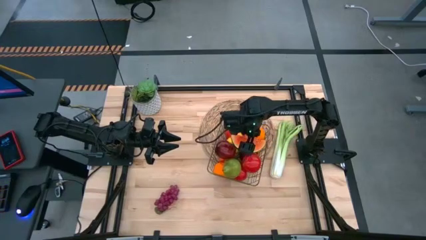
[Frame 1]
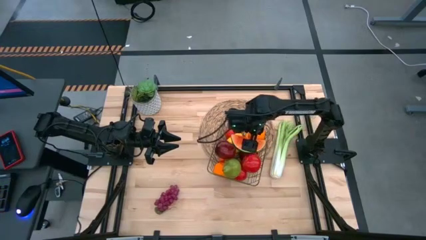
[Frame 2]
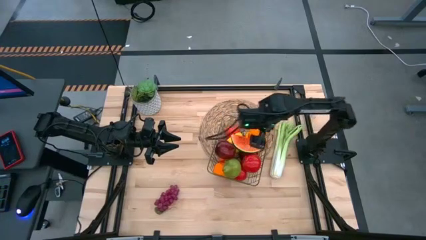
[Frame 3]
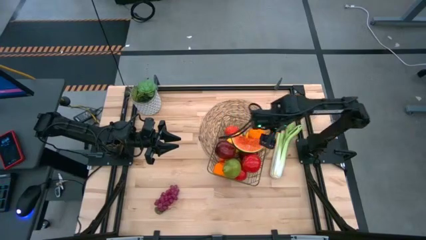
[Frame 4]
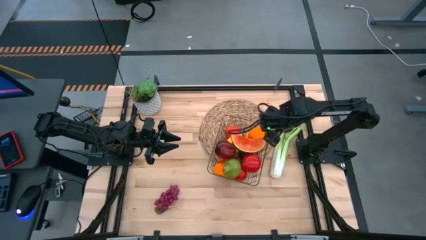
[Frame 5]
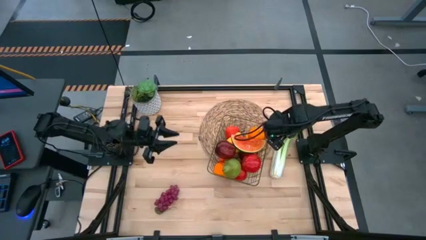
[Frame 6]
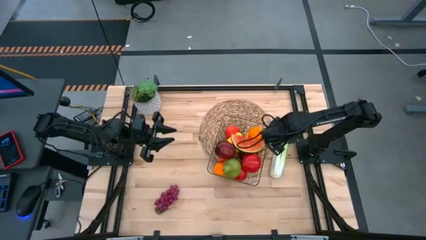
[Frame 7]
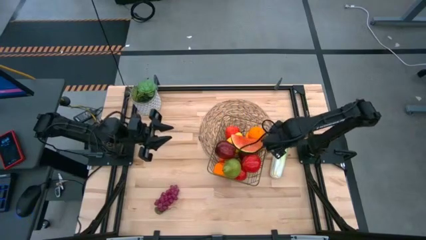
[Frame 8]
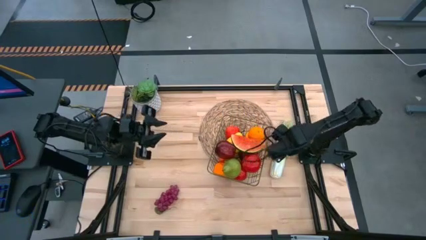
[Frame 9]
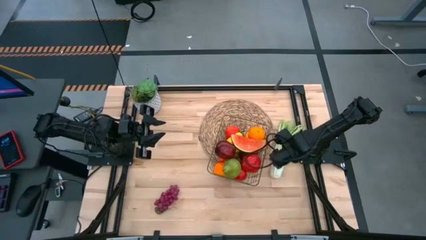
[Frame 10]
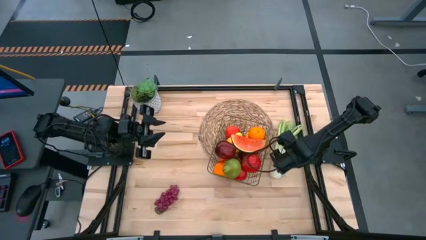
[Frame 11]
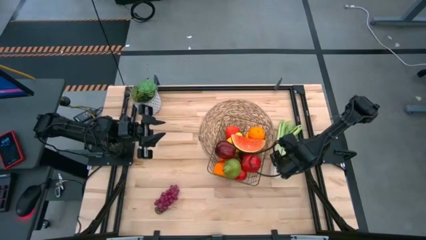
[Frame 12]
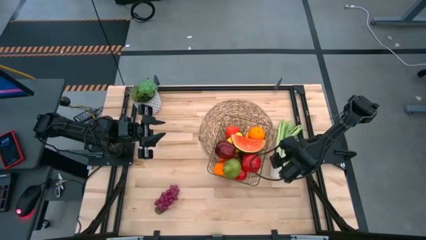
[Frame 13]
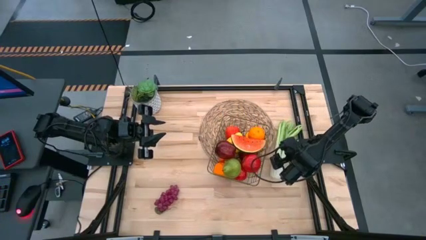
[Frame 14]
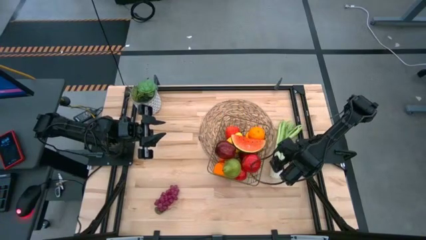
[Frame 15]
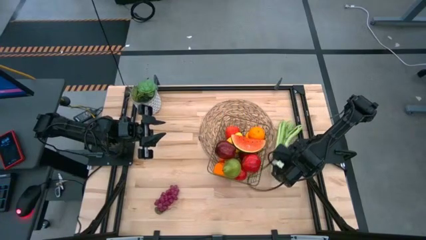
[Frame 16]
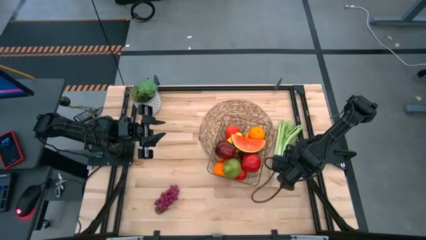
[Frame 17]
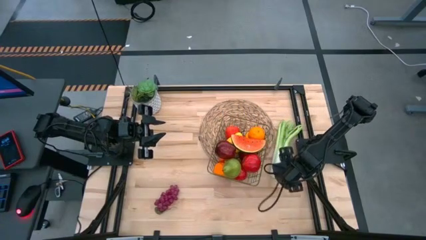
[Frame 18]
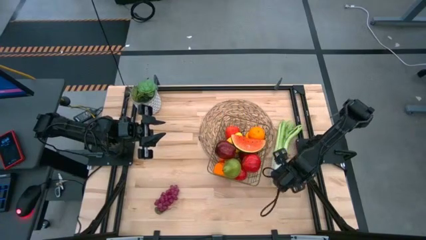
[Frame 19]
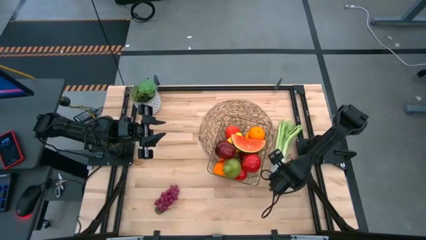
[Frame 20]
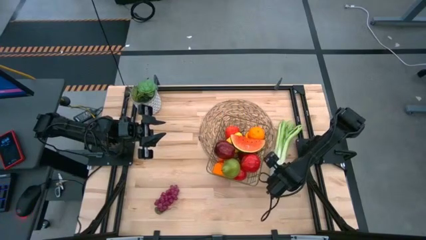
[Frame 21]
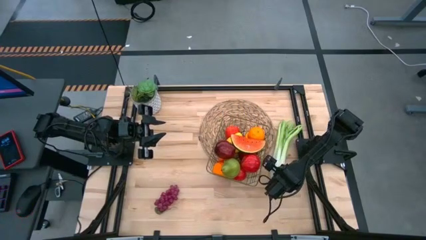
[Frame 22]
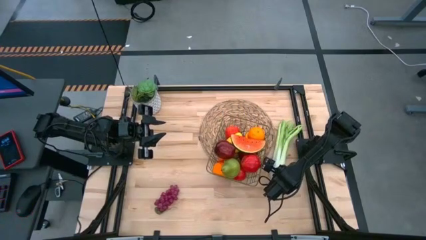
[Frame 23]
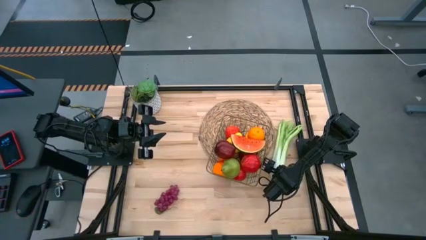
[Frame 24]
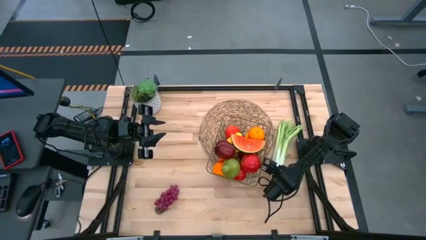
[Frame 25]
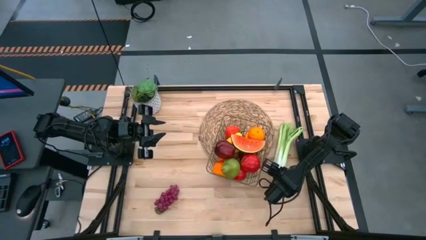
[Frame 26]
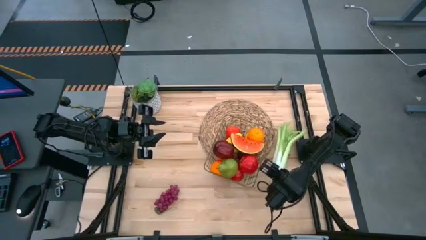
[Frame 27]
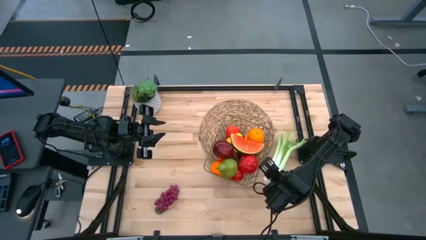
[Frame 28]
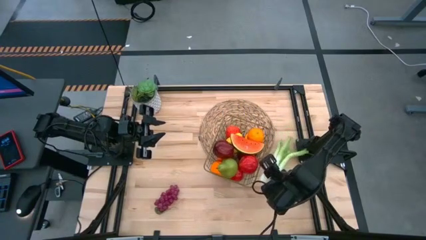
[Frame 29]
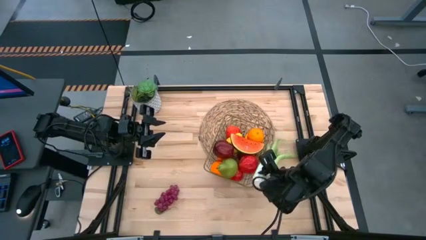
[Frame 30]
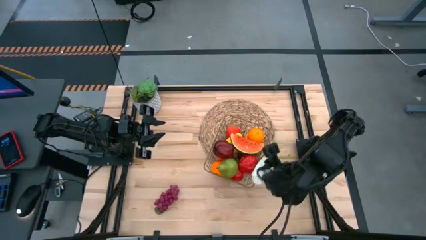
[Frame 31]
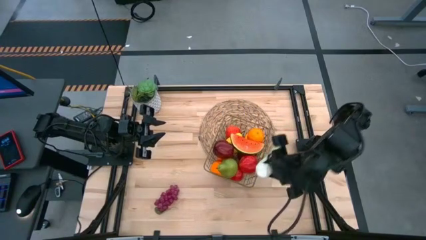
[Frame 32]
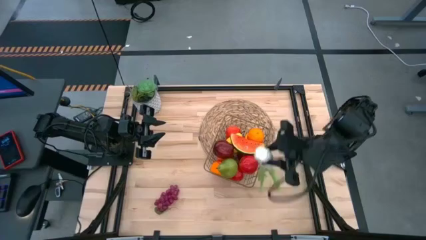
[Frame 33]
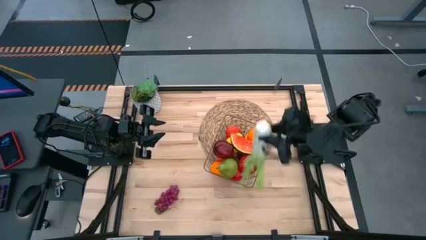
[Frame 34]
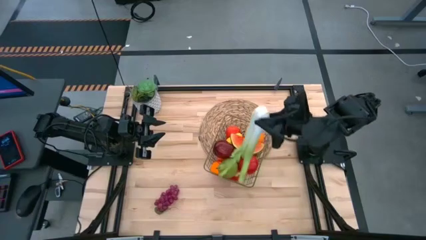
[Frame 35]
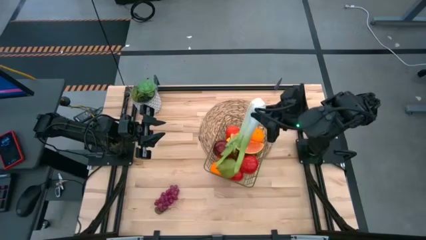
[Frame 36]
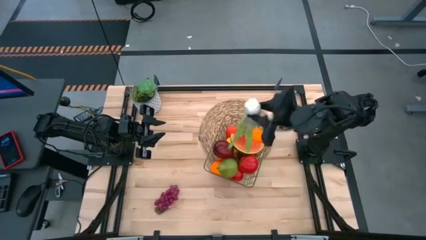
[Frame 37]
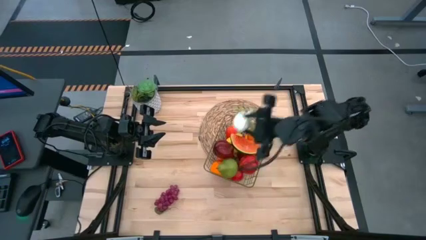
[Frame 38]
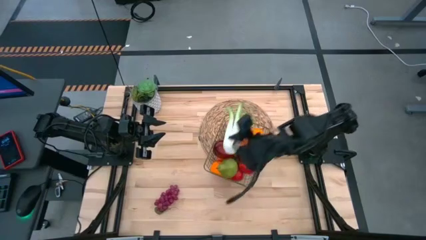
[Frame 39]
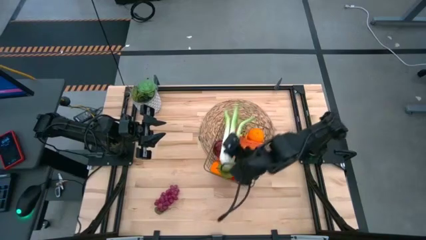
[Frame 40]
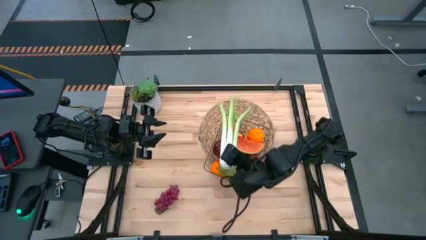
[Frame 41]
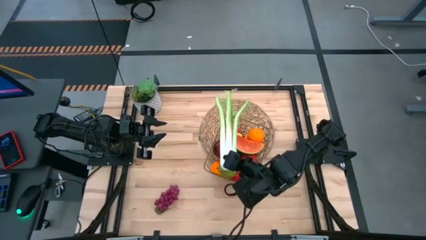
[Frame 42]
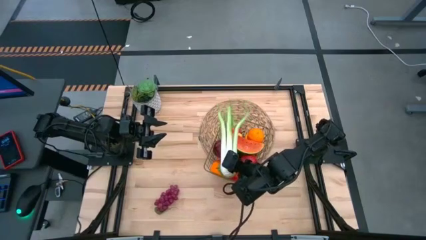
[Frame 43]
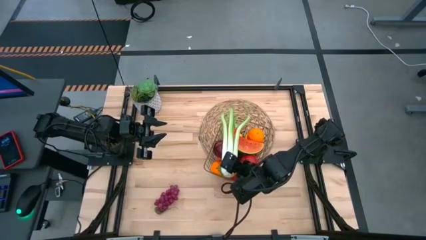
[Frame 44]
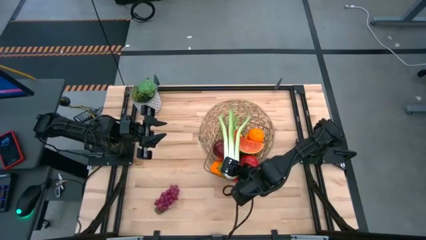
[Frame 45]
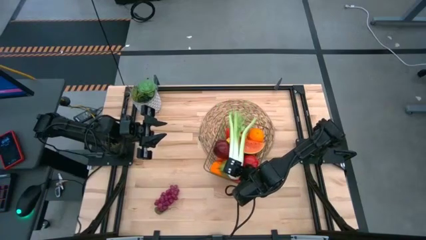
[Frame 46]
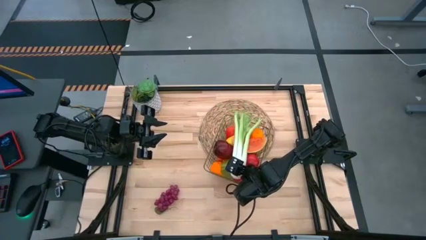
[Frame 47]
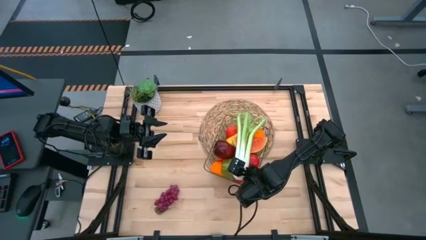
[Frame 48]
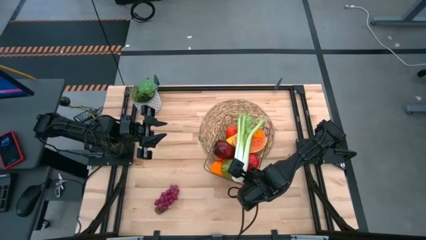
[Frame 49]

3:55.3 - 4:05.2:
Task: Build produce basket
Put the celery into the wire basket

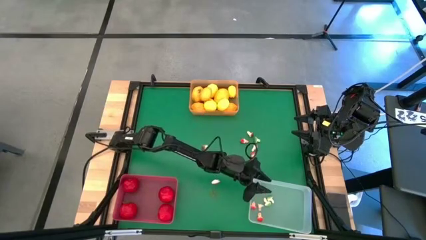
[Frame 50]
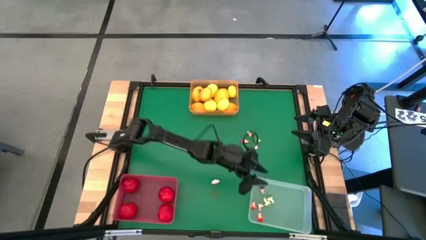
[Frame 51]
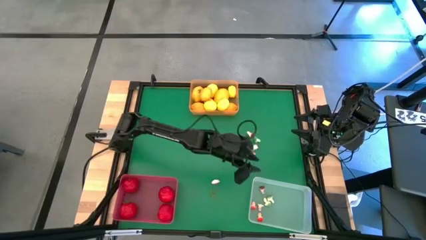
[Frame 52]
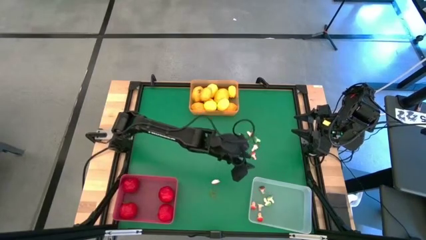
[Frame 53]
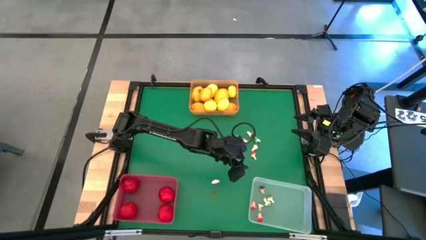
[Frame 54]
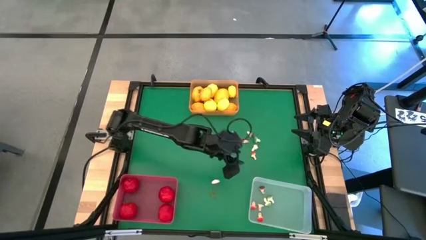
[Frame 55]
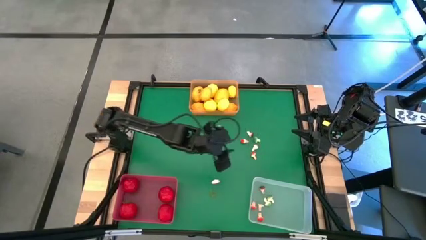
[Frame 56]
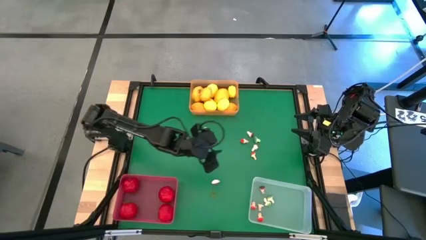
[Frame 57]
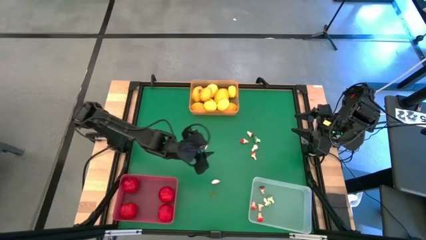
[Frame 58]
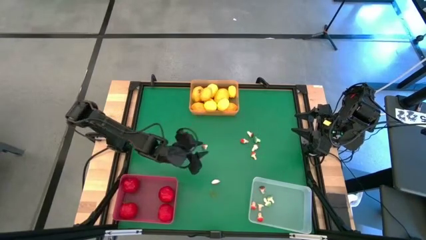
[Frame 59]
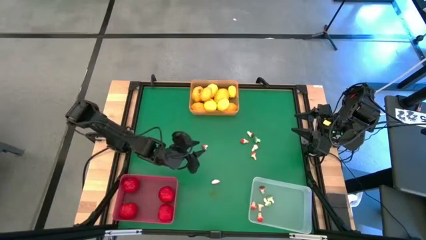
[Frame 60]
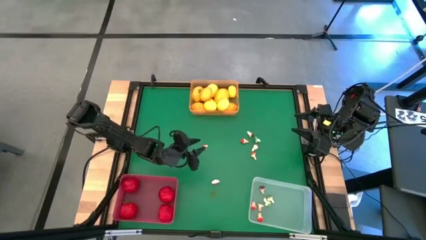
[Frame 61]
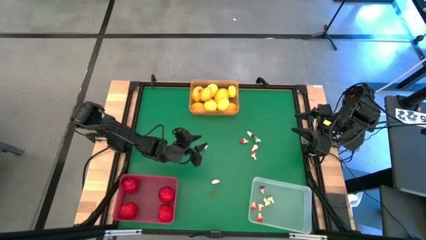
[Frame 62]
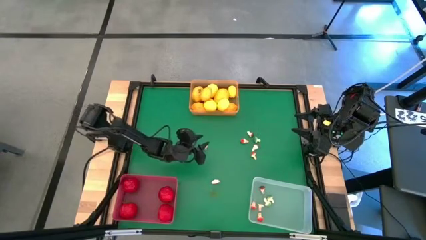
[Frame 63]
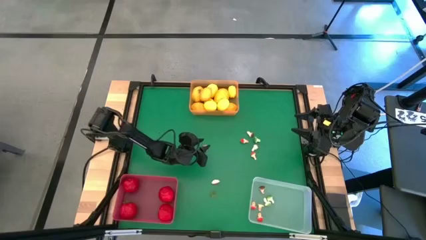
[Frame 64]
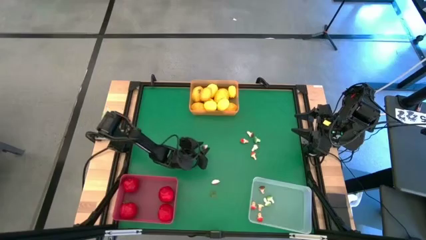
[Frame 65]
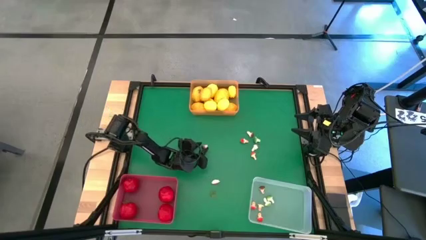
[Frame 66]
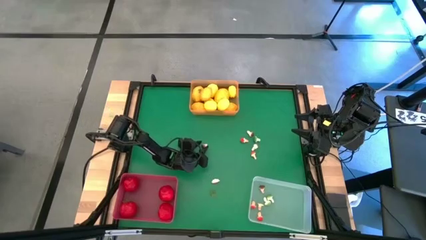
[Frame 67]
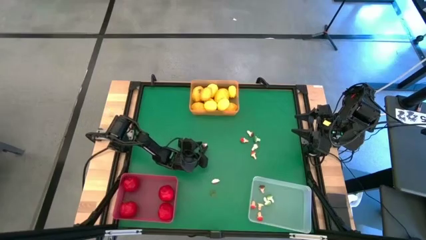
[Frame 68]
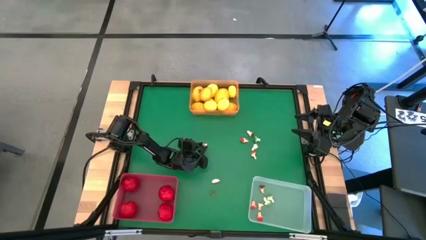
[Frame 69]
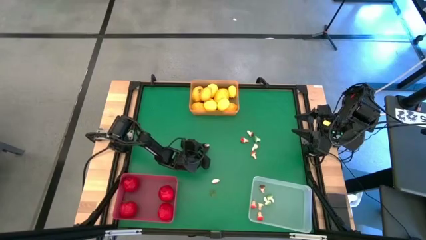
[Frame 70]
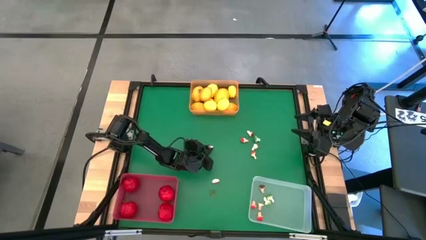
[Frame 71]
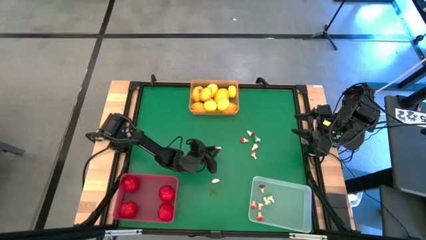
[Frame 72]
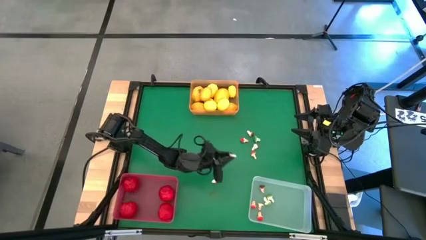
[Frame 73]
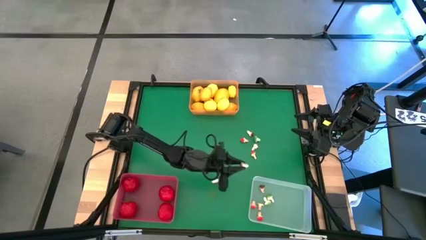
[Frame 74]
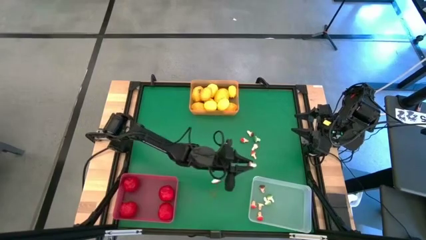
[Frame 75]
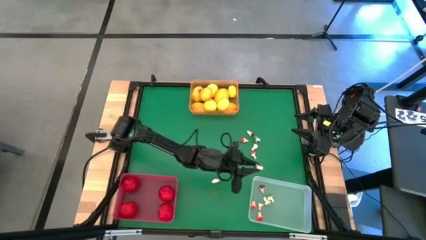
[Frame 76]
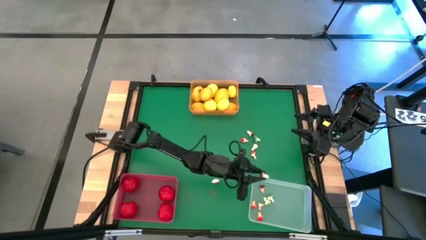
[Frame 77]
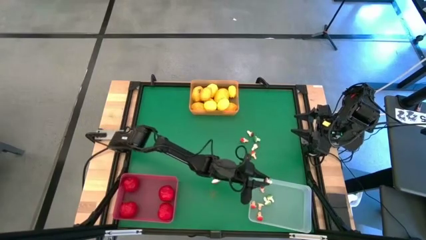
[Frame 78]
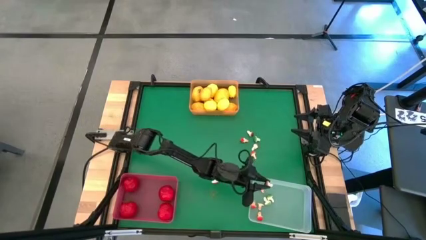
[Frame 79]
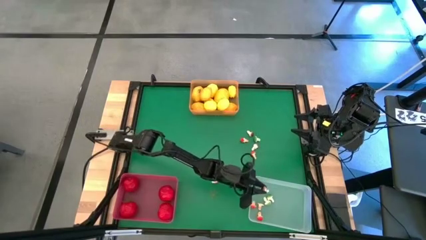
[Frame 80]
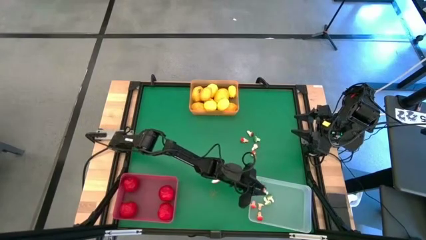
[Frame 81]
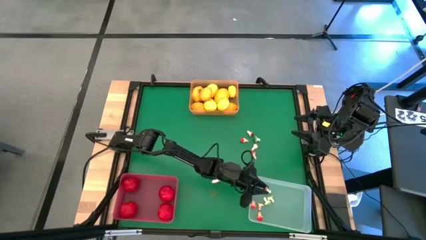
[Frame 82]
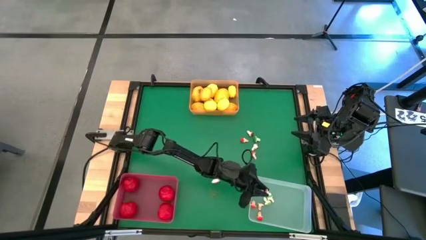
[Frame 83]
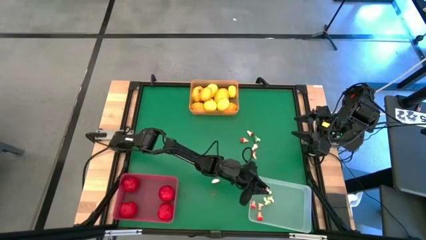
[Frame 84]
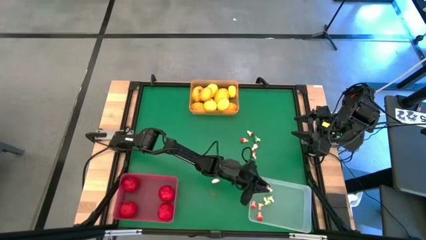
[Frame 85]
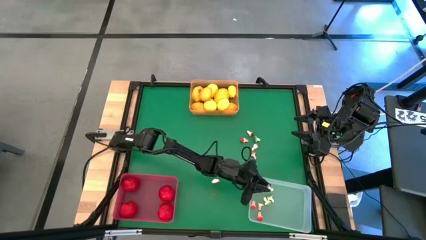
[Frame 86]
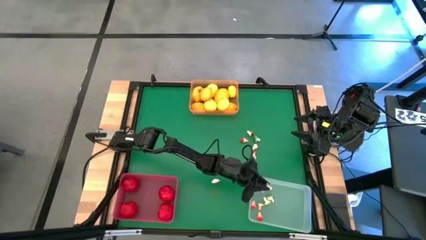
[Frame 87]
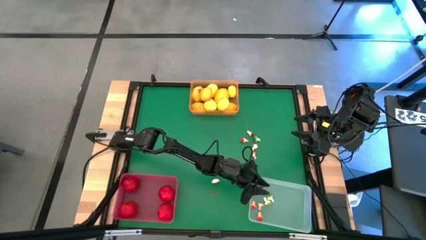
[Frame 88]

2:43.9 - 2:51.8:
Task: Sort produce into baskets
Put the brown mushroom into the transparent bin
